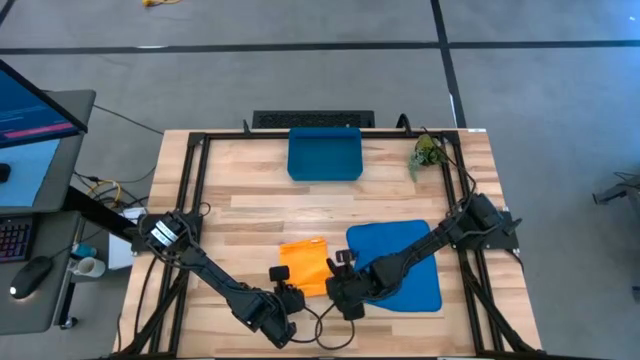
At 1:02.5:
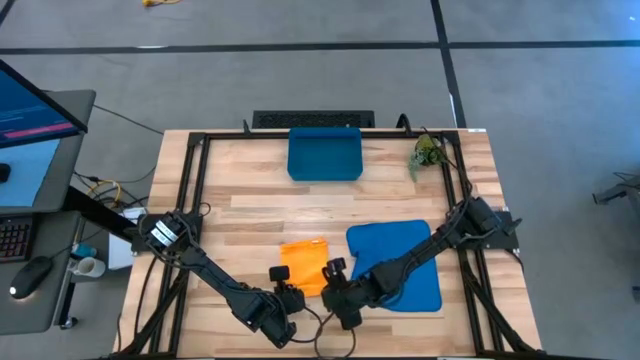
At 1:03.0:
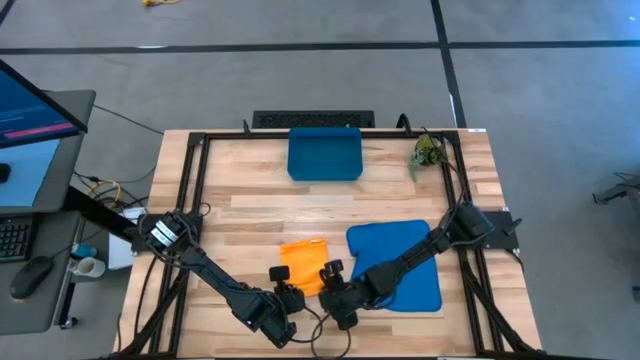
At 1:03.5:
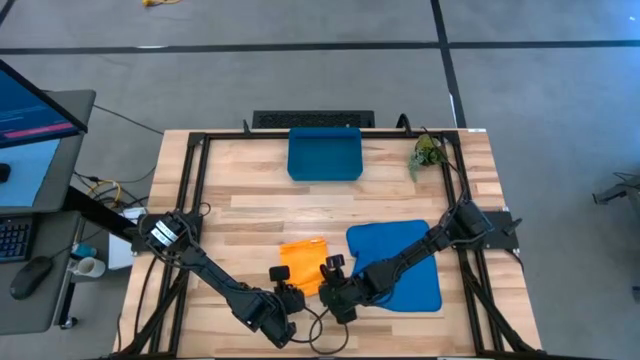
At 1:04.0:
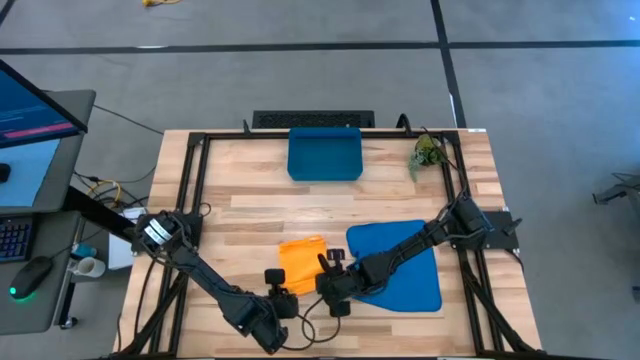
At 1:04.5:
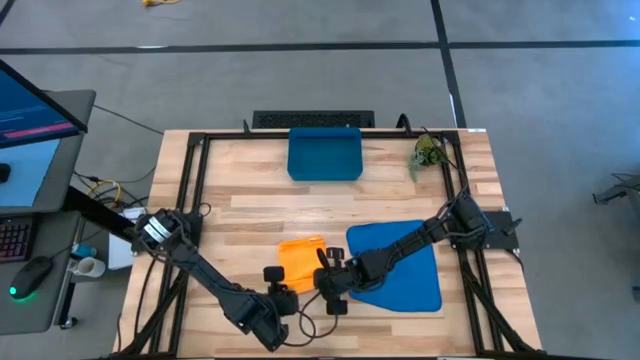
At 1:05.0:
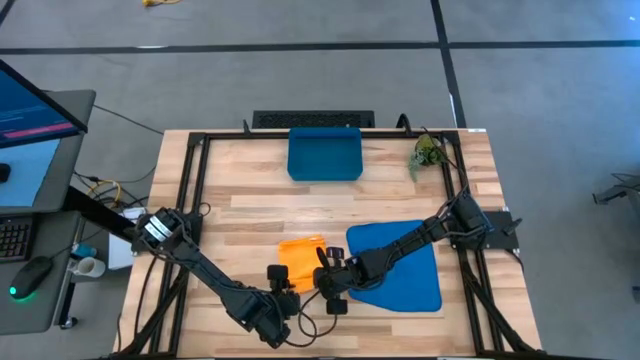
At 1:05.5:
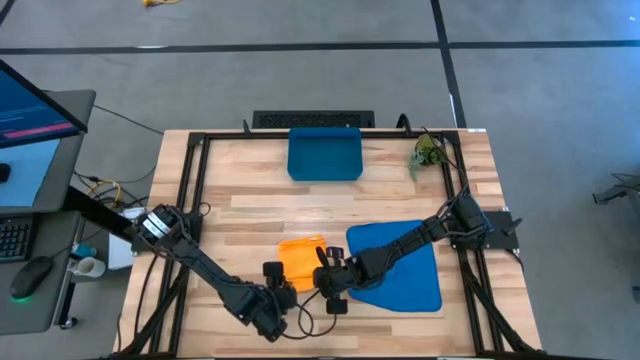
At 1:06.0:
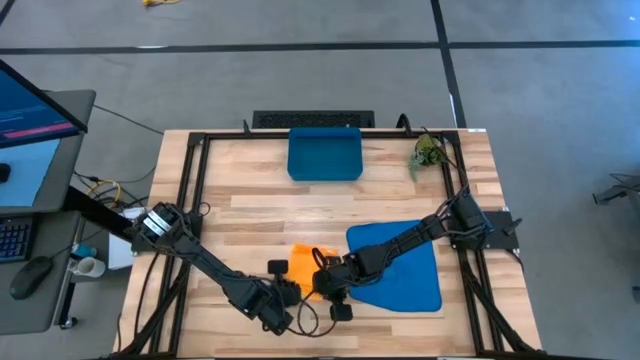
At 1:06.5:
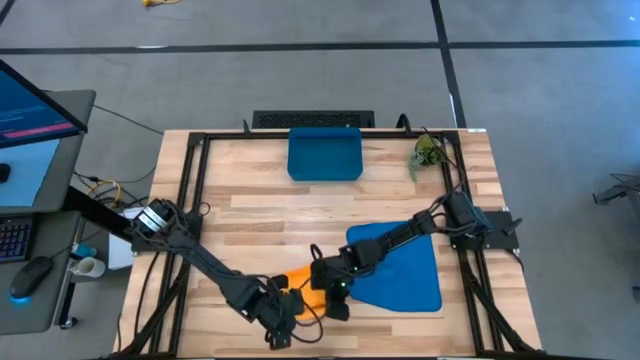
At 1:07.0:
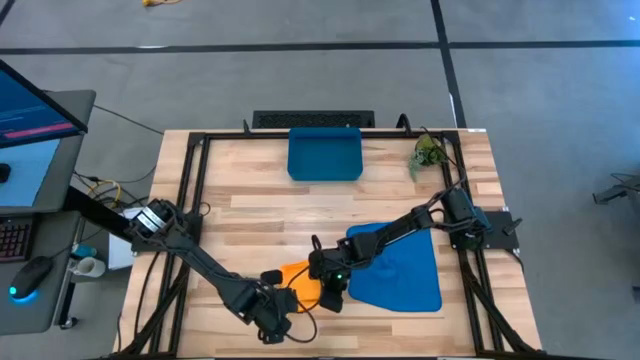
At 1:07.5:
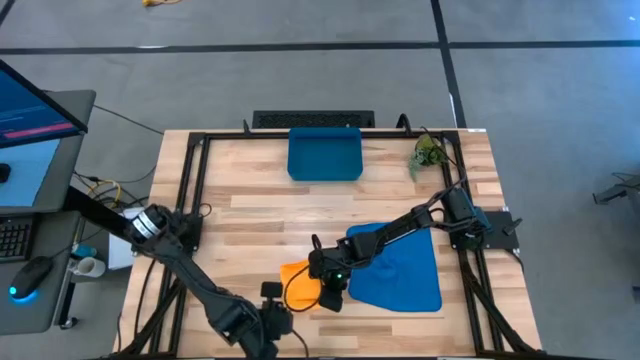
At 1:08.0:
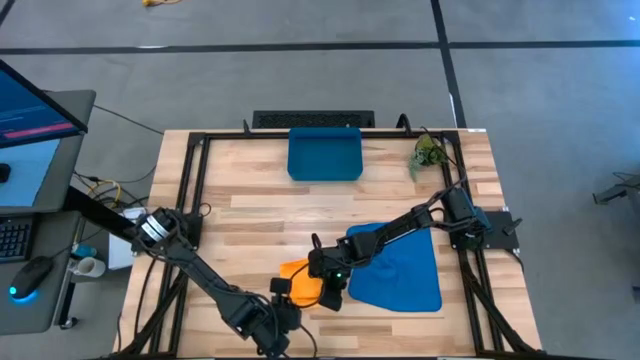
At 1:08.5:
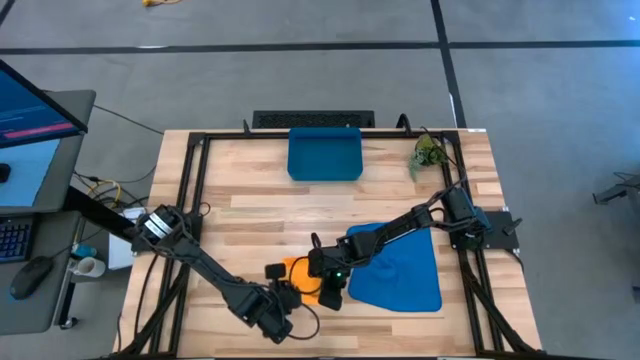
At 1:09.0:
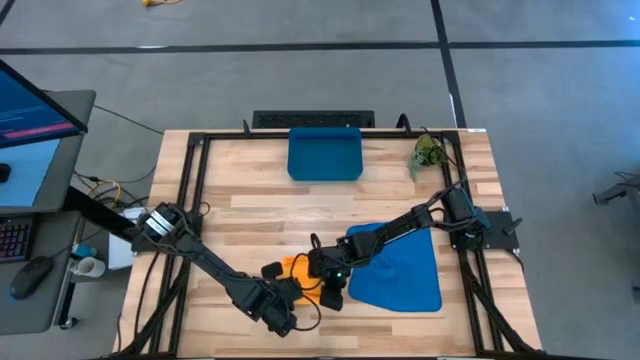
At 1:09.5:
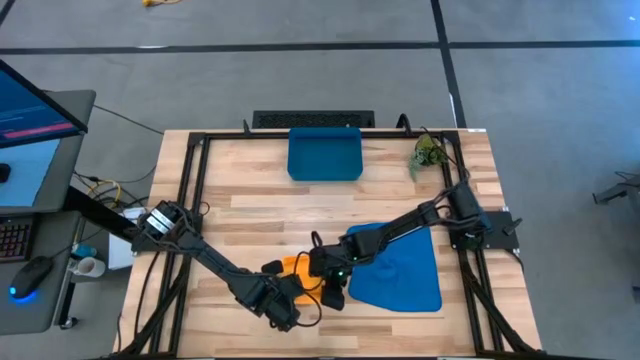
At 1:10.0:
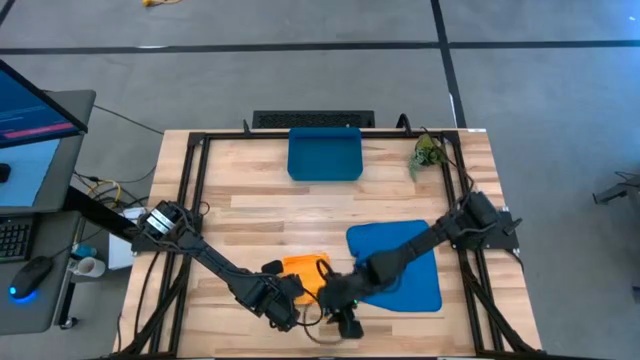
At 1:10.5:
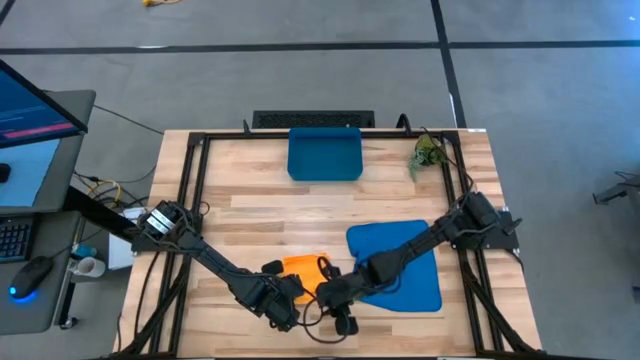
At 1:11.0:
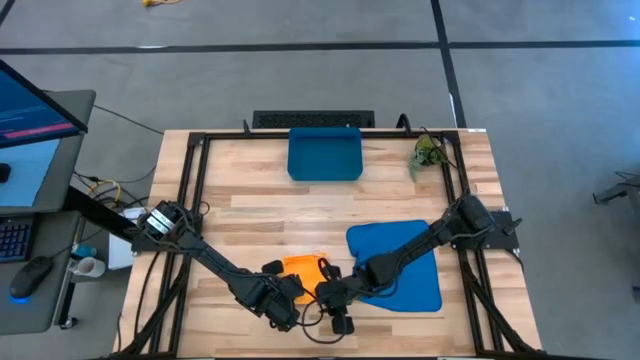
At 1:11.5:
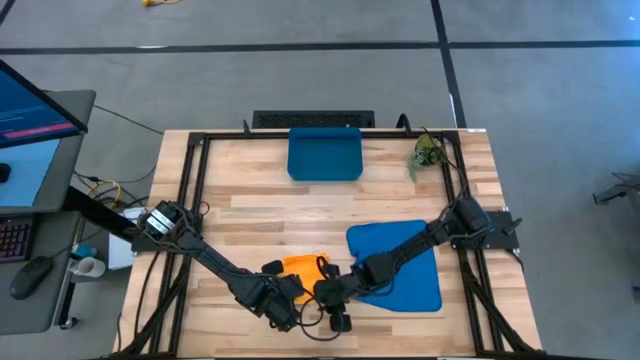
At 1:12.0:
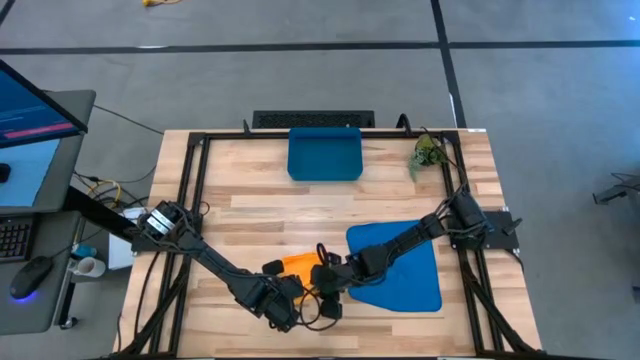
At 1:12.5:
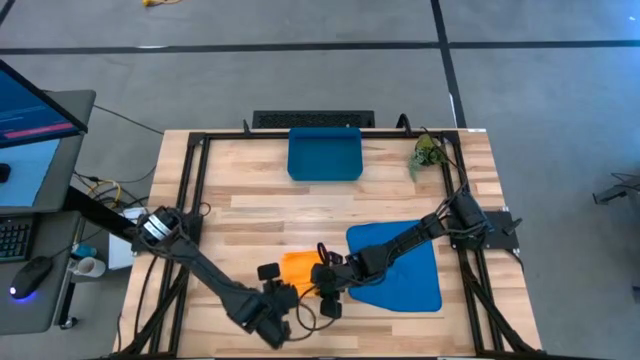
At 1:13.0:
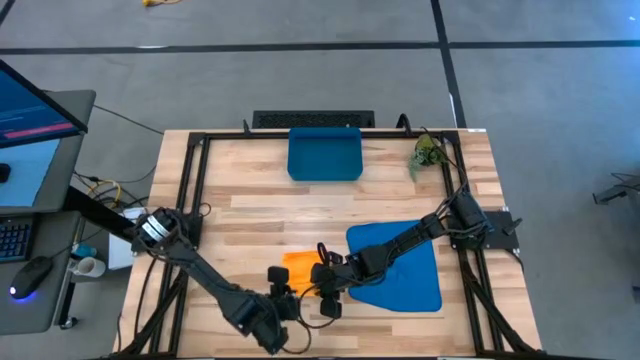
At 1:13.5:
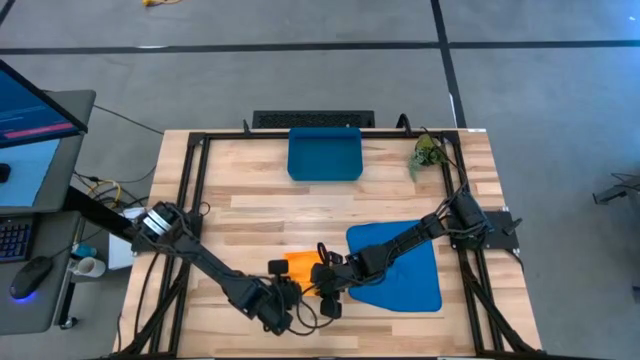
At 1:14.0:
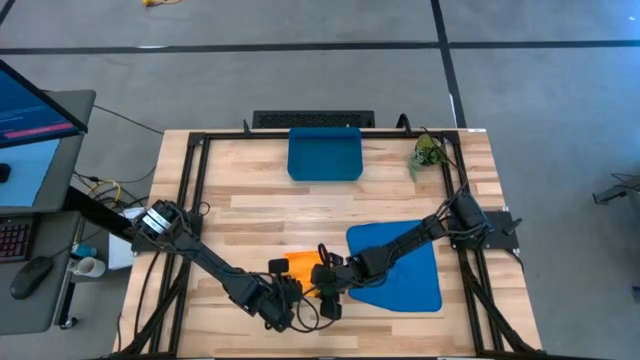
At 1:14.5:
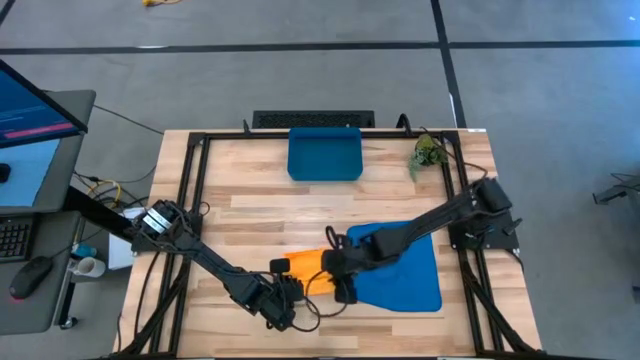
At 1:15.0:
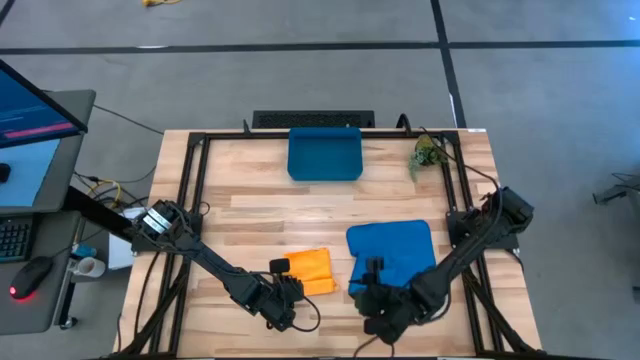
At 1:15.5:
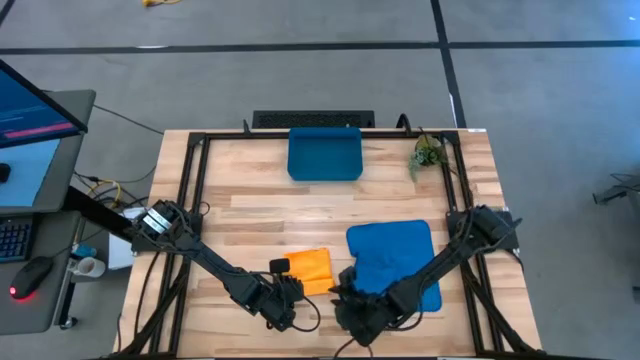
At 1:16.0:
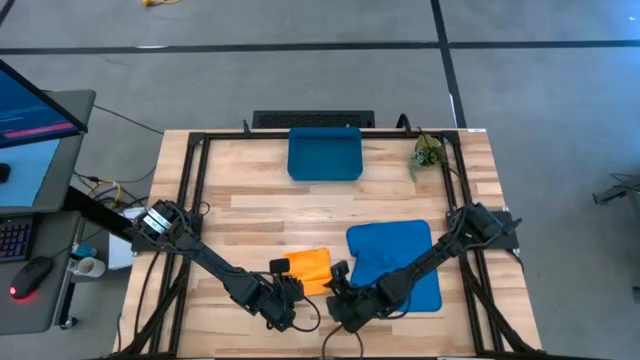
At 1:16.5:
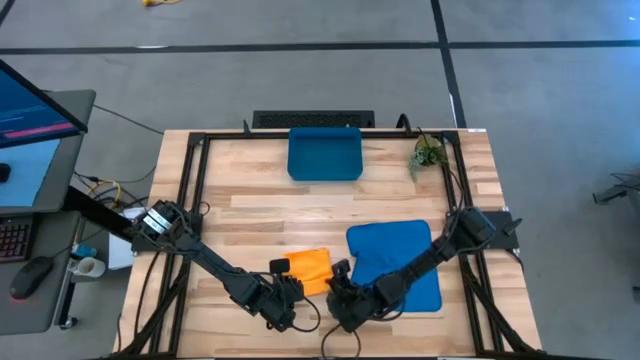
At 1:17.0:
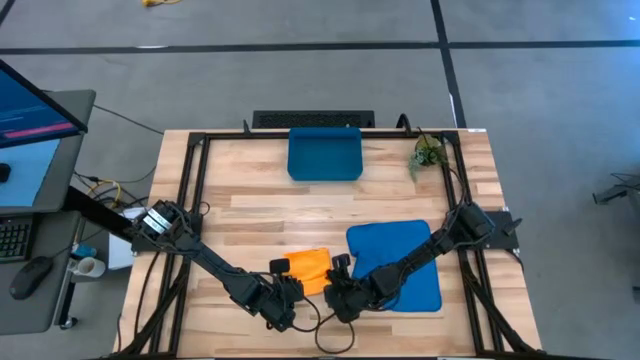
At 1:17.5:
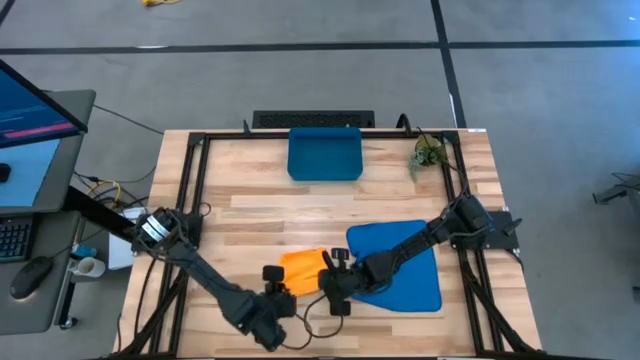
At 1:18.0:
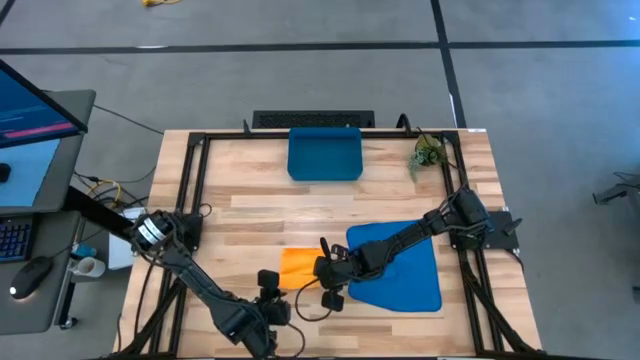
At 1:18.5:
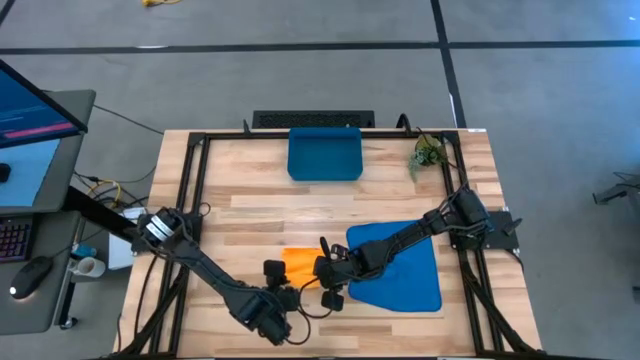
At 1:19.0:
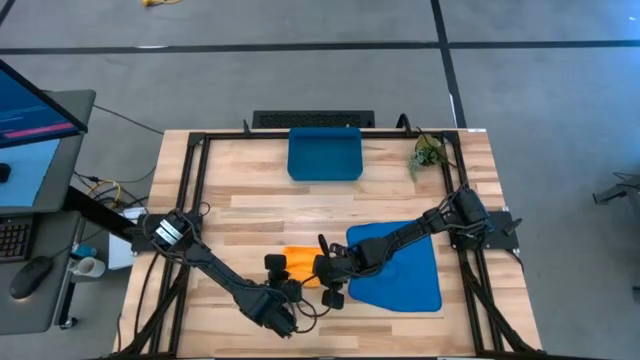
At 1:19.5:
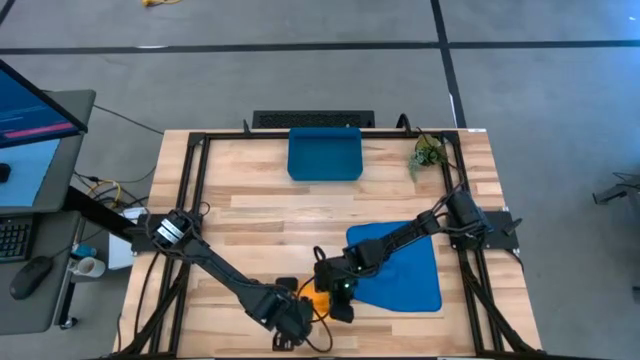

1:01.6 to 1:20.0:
Task: Roll microfiber towels into tight, uniform cylinder then place into a basket
Roll the yellow microfiber cloth

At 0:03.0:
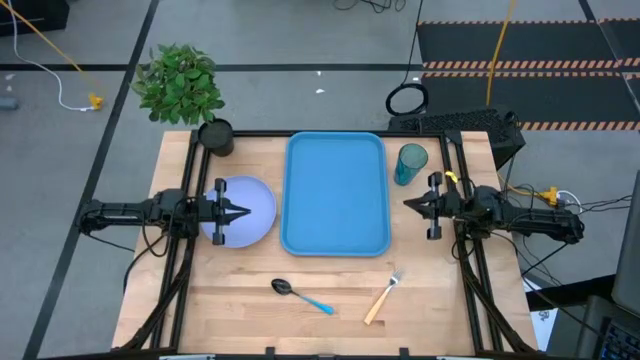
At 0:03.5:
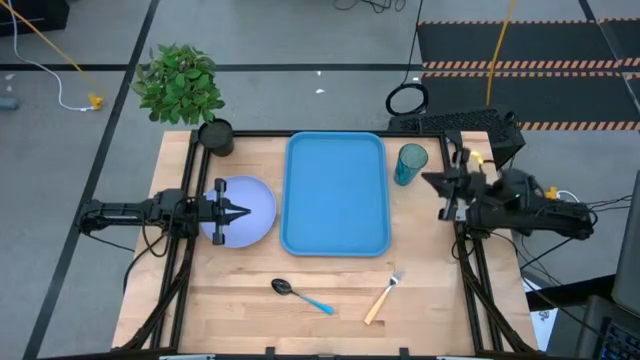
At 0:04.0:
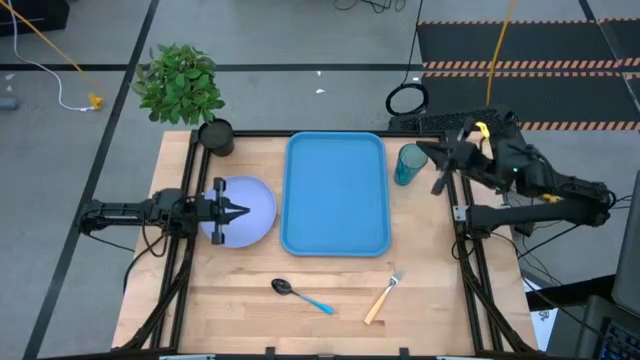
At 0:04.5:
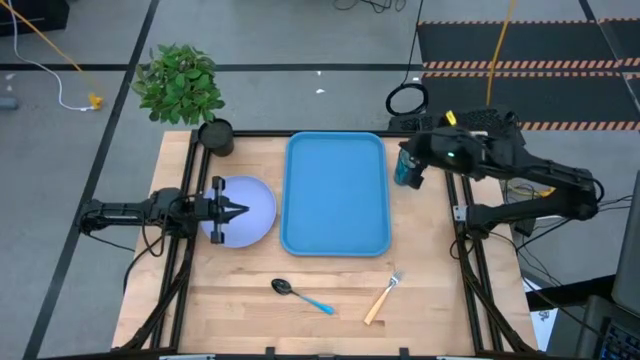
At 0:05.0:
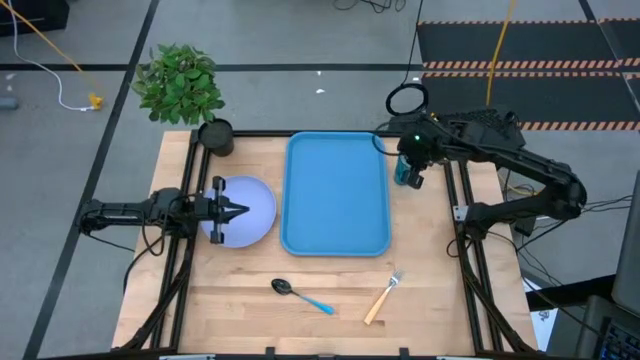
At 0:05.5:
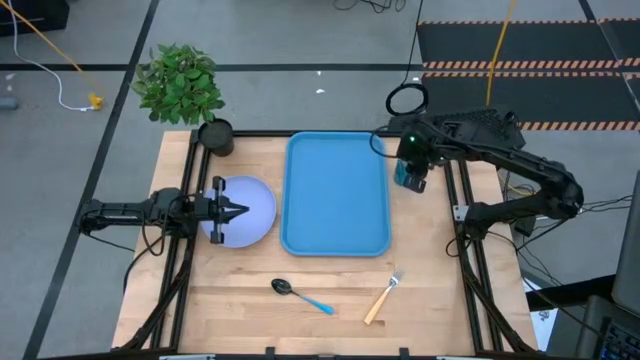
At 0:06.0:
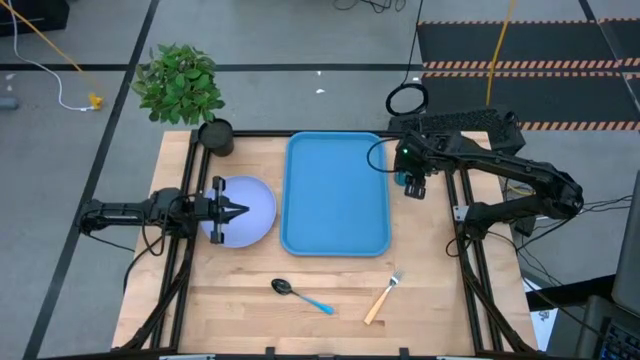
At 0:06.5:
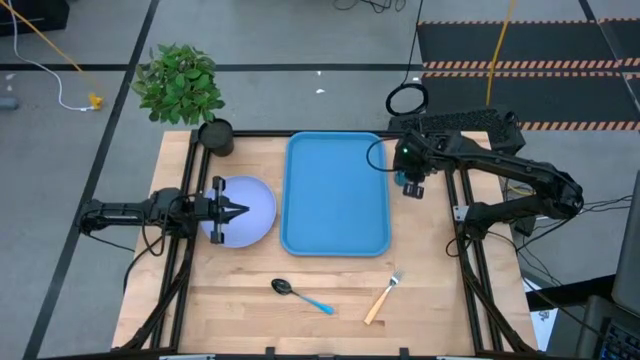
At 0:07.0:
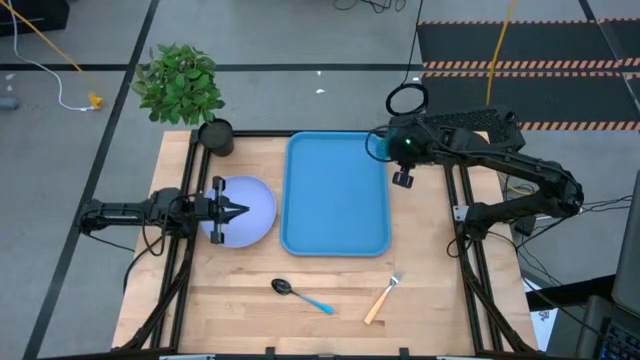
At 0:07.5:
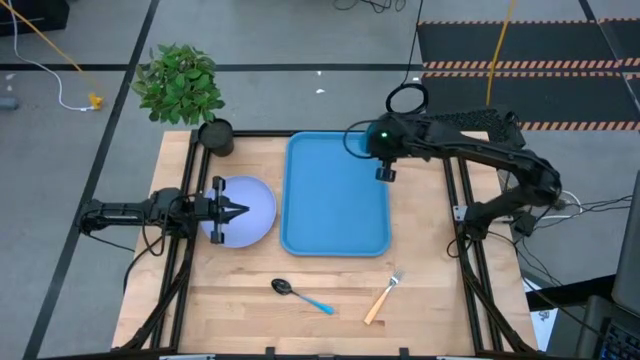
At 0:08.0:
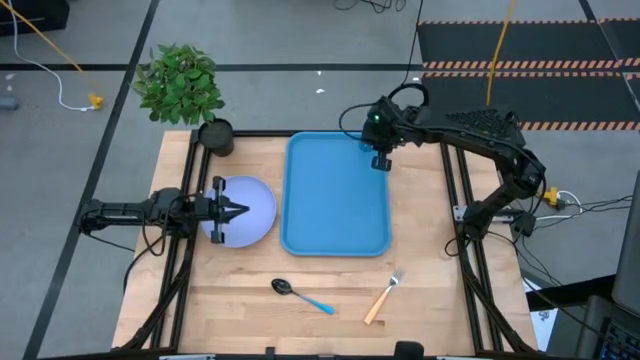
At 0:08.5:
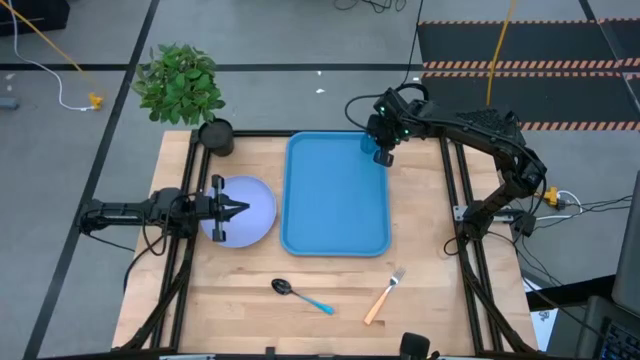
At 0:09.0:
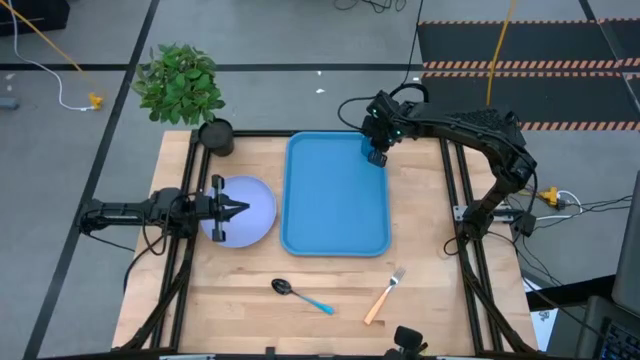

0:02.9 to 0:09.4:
Task: Pick and place plate/cup/fork/spoon on tray
Put the blue glass on the blue serving tray
